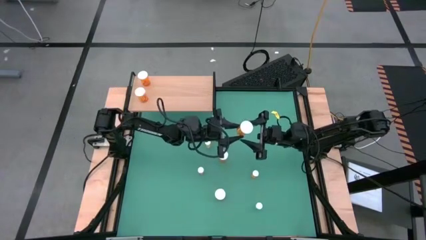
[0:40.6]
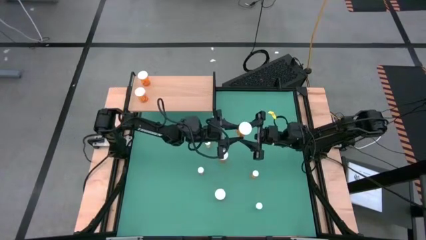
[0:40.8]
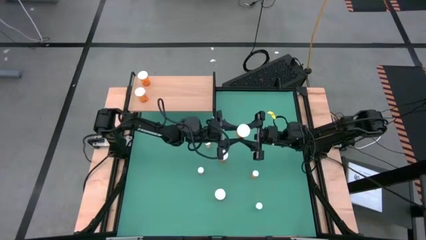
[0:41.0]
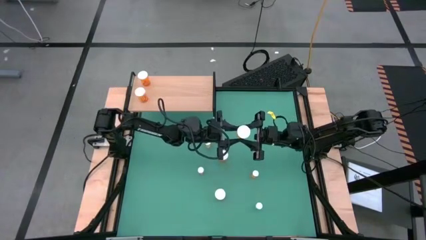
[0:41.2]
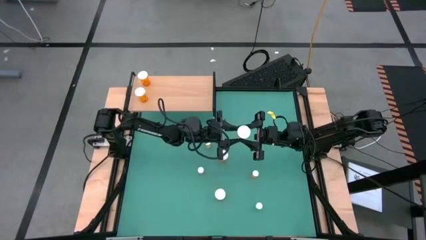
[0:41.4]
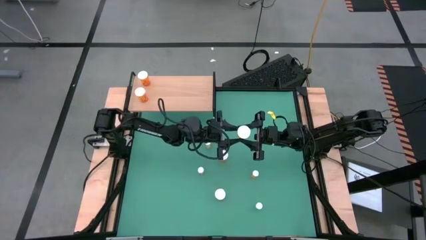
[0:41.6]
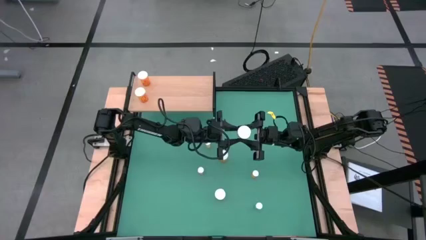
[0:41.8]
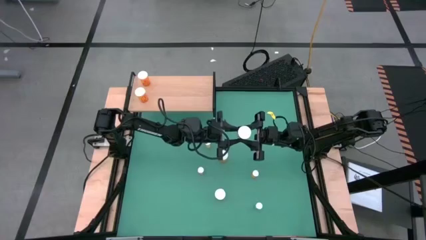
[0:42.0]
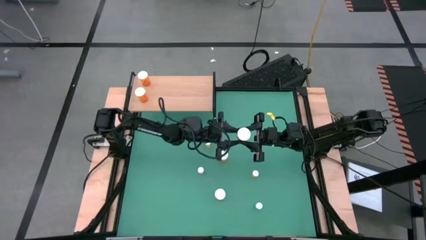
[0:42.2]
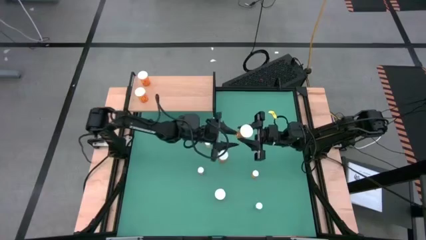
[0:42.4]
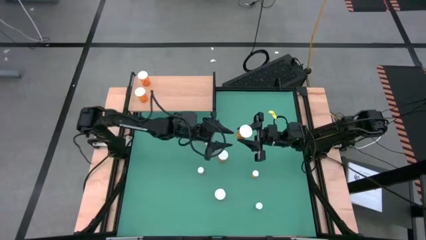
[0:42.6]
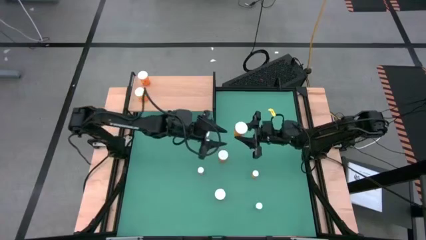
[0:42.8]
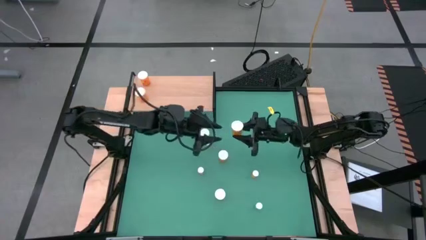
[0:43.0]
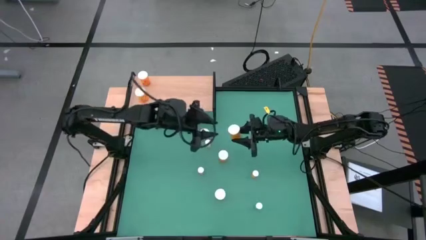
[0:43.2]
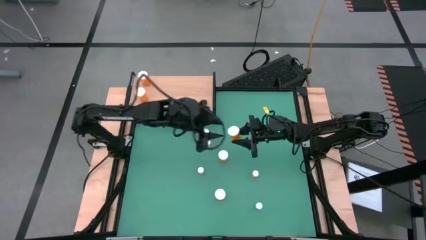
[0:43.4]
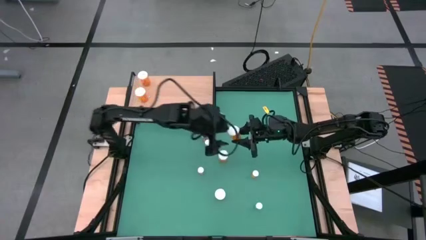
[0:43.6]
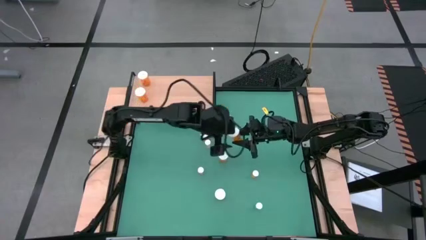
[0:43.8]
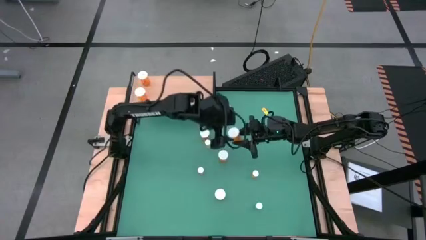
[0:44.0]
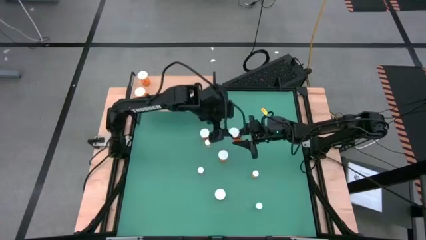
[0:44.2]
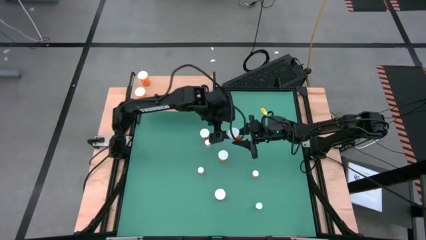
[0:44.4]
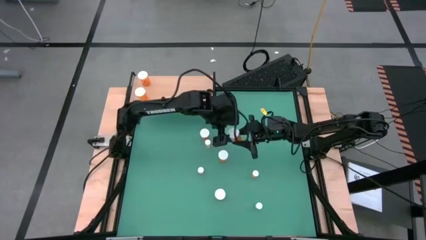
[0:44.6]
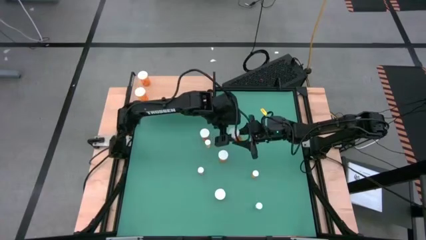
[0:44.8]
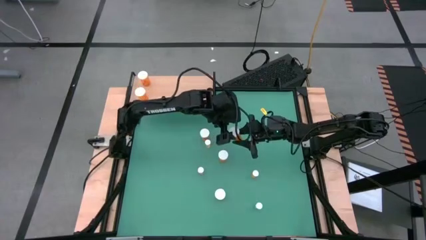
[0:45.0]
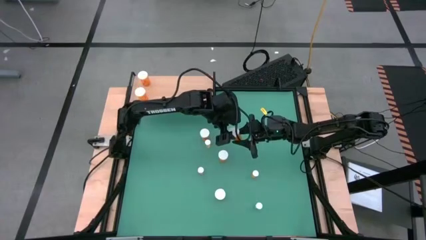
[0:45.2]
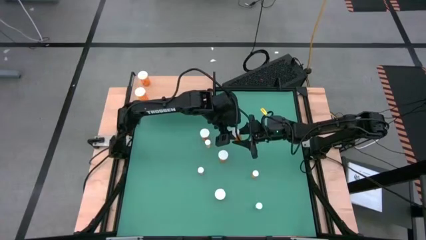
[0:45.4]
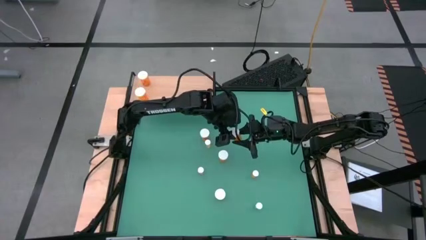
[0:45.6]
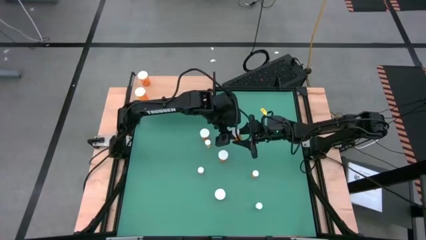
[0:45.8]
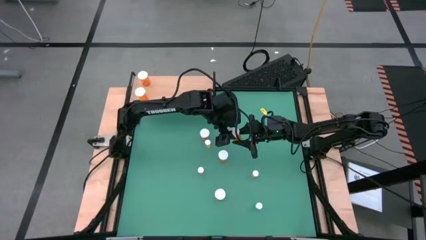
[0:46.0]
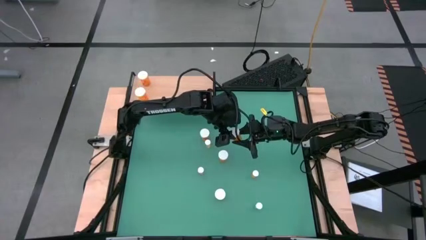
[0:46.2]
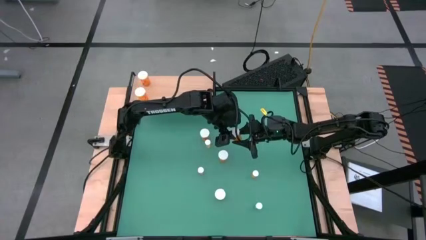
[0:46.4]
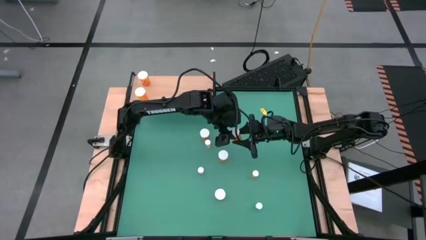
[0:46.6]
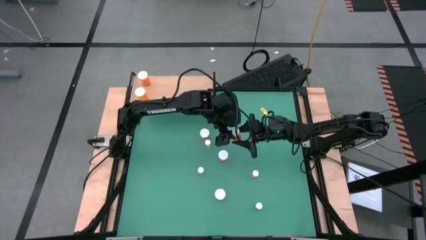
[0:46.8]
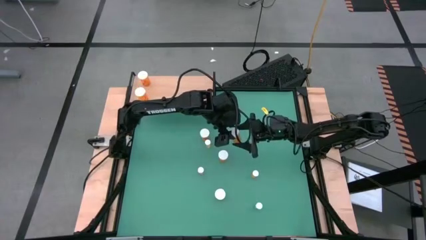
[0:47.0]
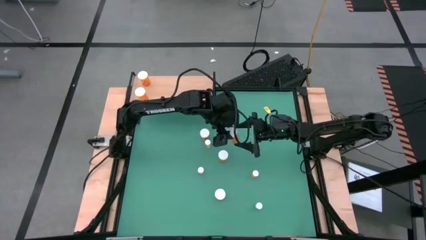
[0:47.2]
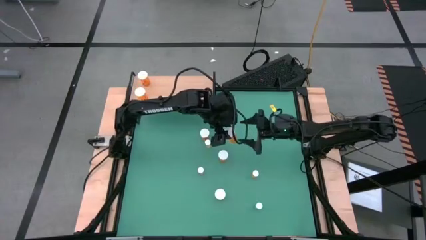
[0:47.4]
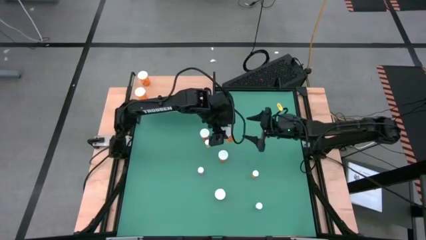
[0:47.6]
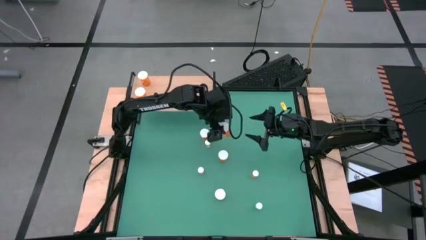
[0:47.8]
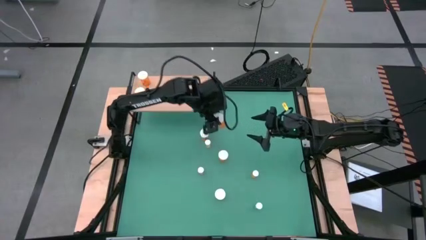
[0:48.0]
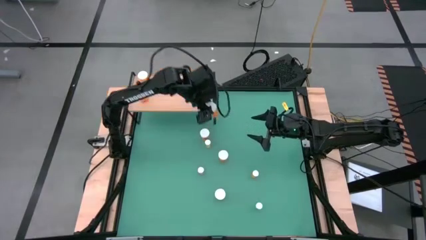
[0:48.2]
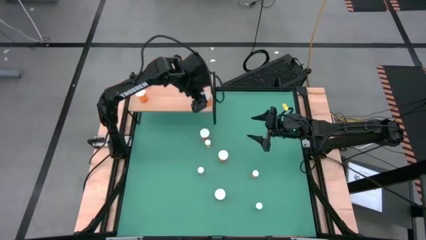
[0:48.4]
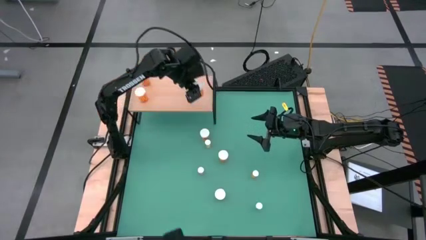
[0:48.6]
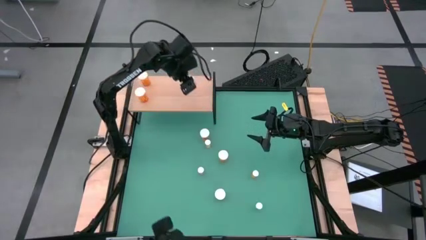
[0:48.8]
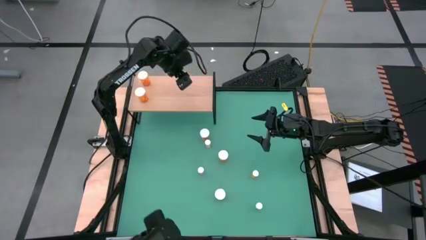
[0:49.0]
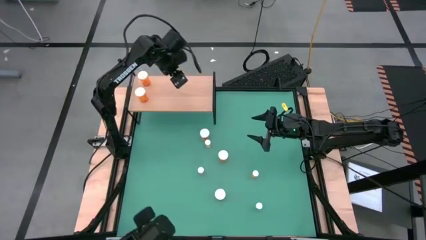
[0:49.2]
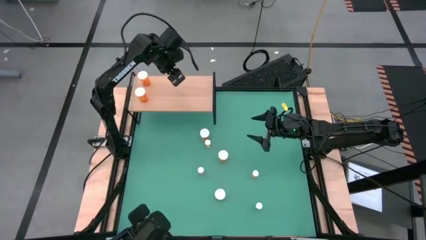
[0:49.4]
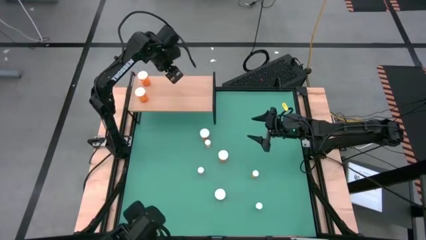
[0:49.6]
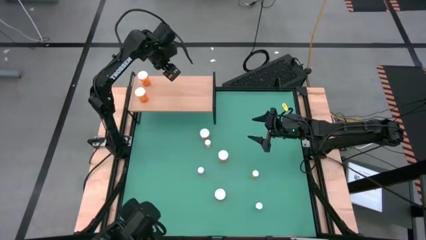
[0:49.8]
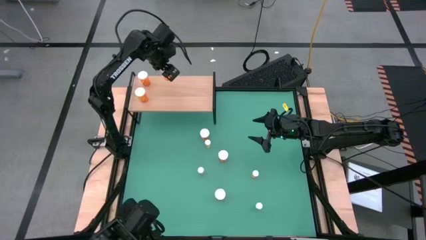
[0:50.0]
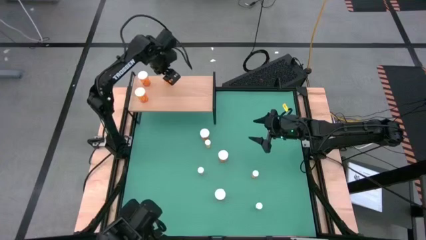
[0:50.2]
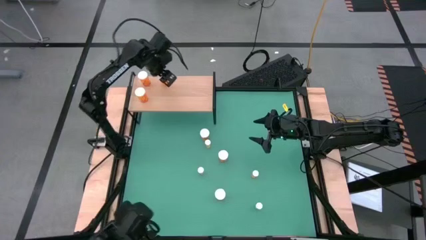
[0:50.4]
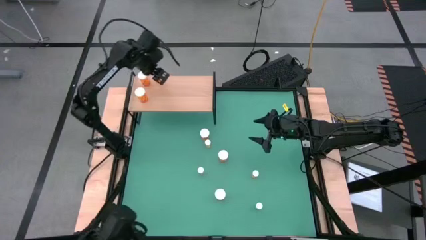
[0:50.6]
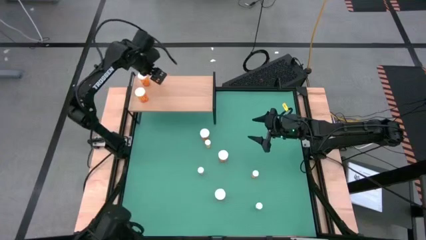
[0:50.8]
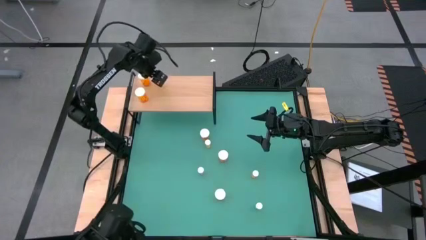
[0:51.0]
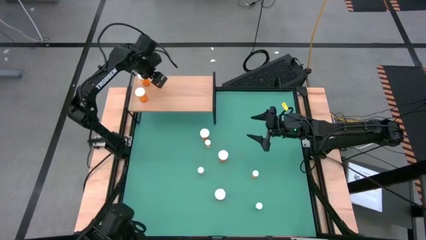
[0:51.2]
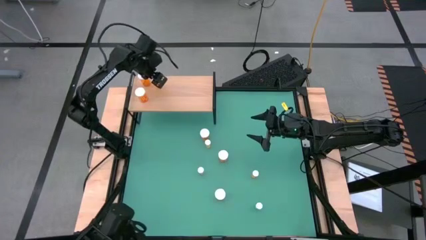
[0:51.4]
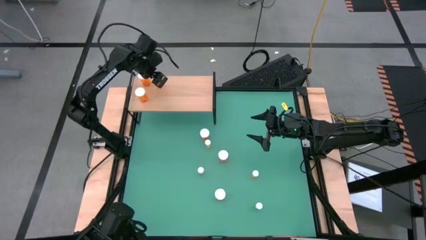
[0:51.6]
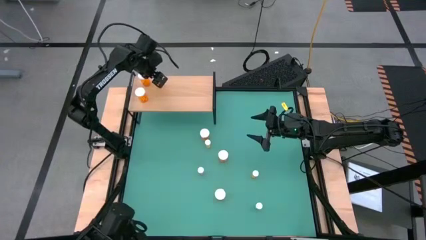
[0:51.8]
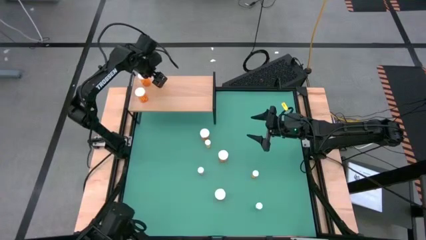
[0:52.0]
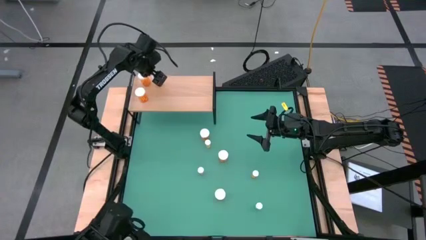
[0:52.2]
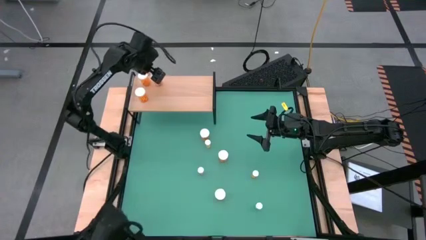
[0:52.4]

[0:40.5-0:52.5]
Task: Pick and place medicine bottles onto shelf by color
Put the big orange pill bottle on the shelf aligned with the other big orange pill bottle
